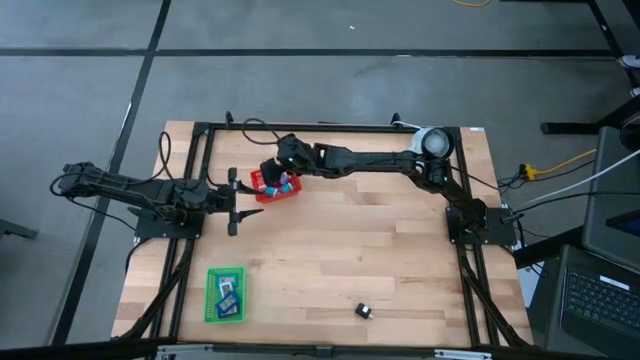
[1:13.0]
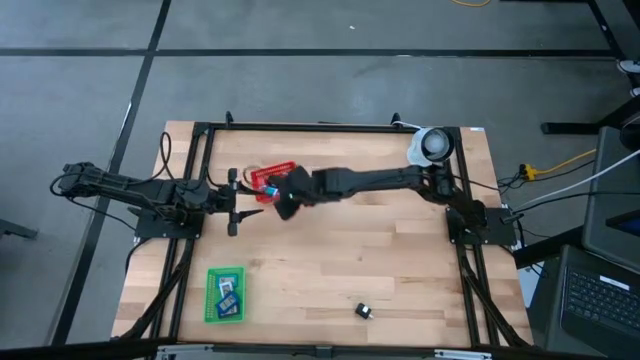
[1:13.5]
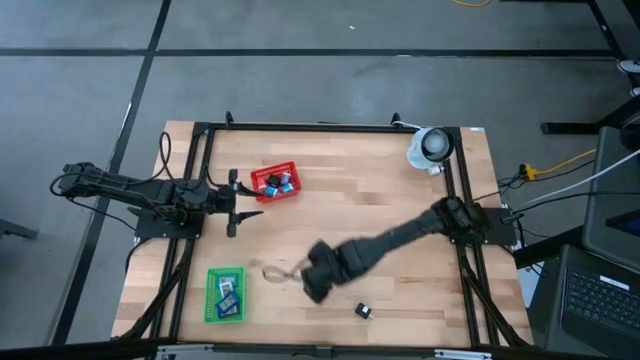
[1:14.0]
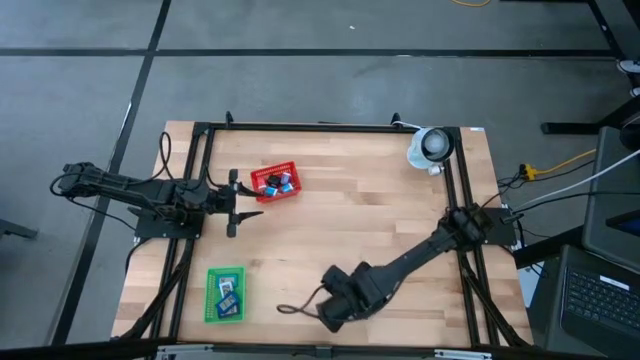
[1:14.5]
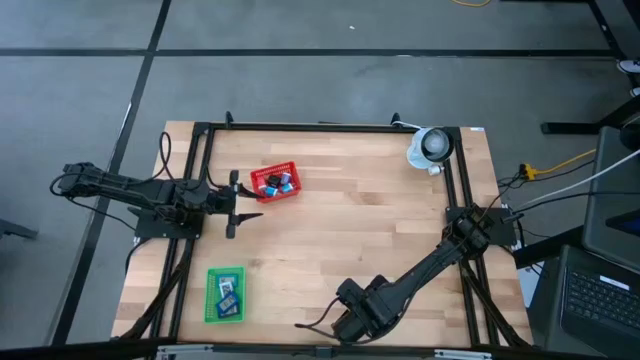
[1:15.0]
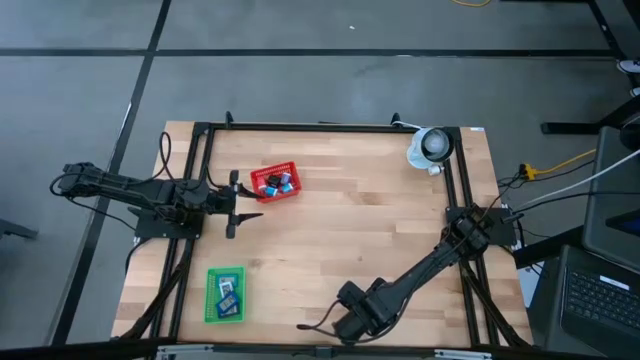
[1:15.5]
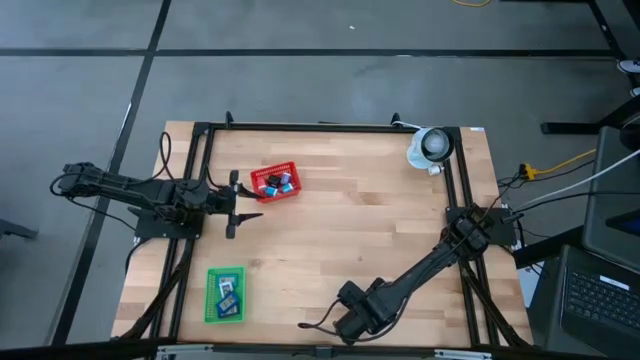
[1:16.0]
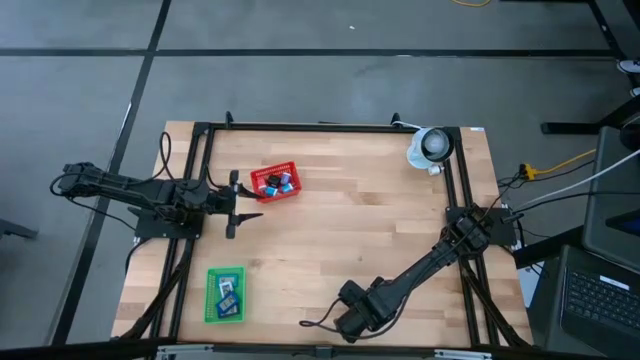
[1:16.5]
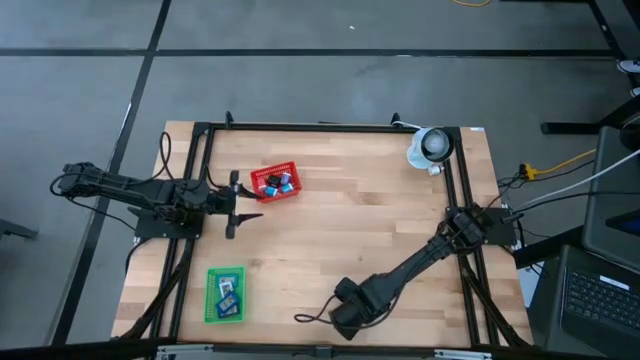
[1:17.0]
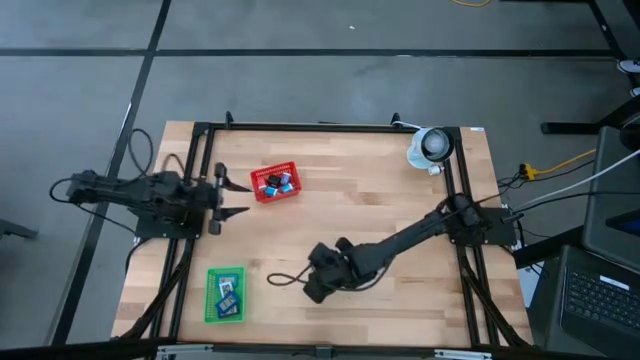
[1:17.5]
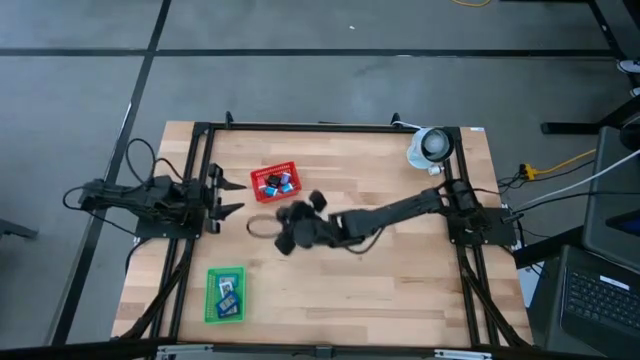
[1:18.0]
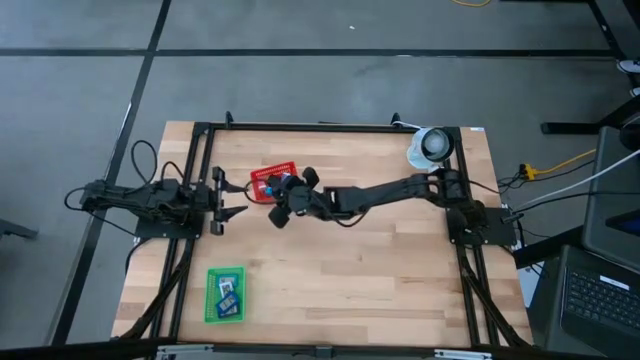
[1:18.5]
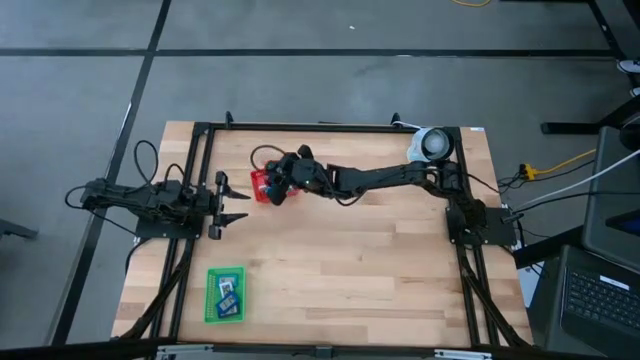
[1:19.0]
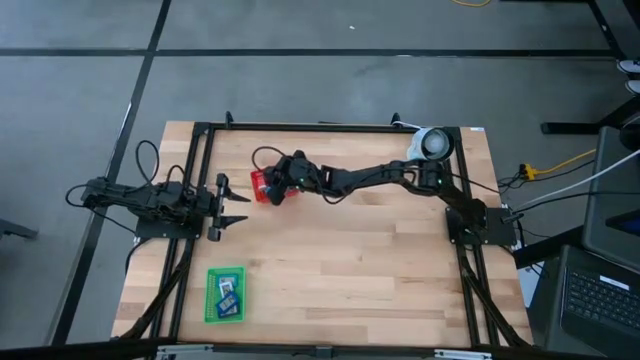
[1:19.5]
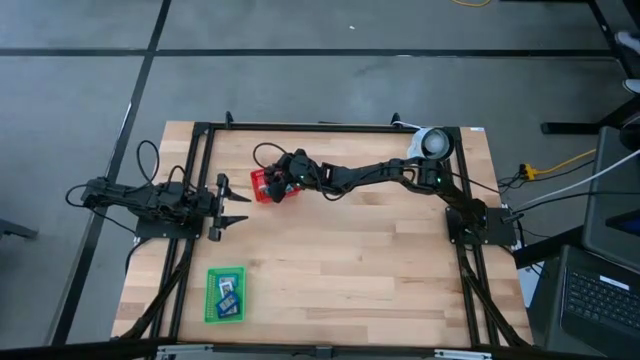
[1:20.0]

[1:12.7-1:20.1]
Task: Pick & Place Office items
Put the black charger adapter into the red bin

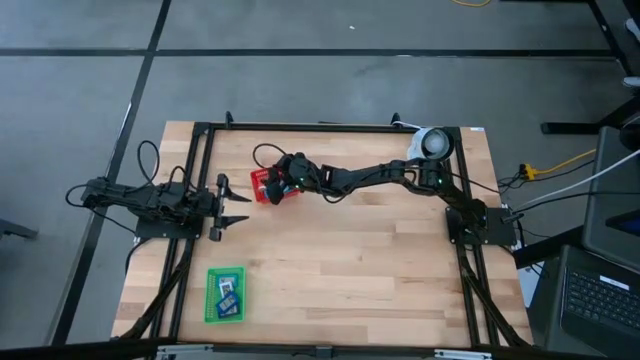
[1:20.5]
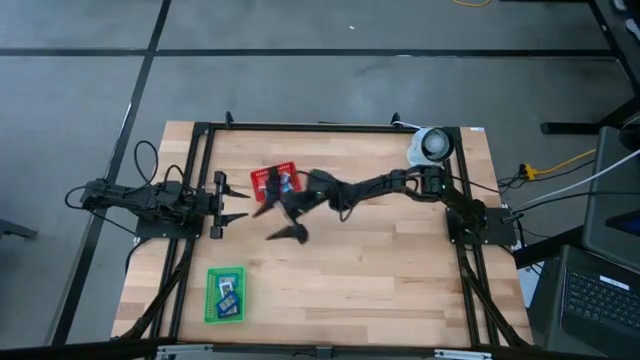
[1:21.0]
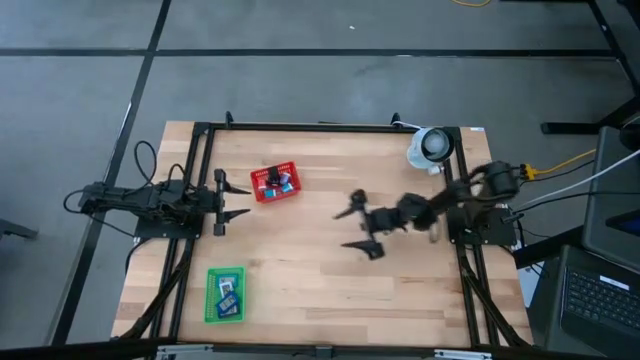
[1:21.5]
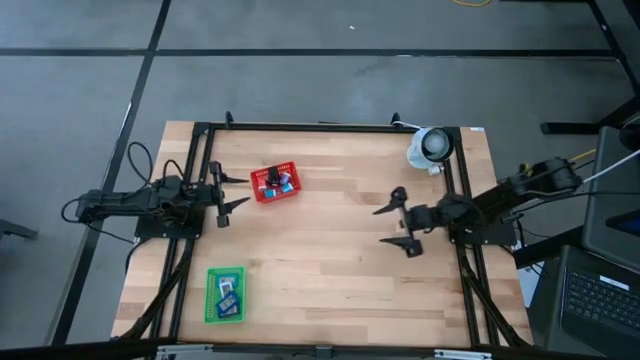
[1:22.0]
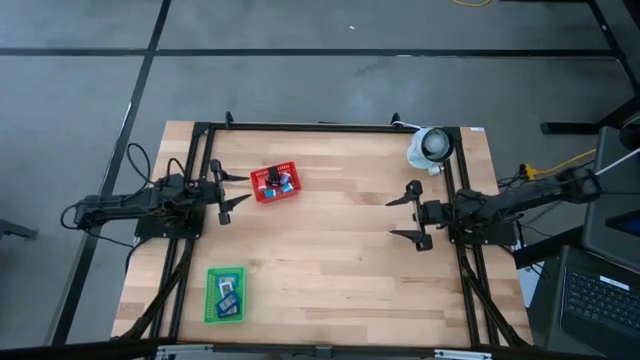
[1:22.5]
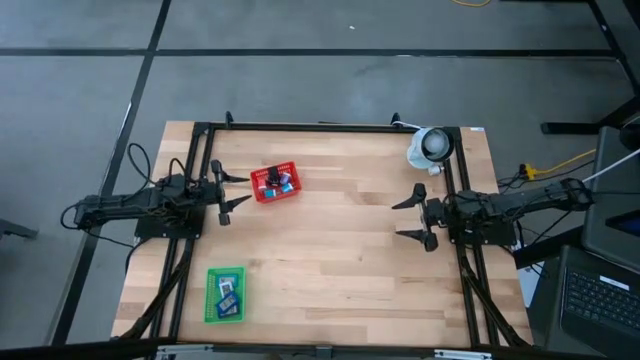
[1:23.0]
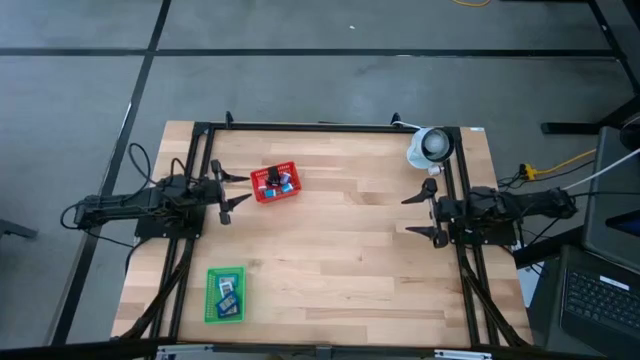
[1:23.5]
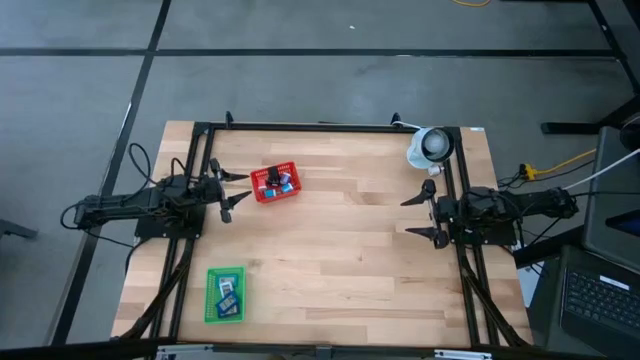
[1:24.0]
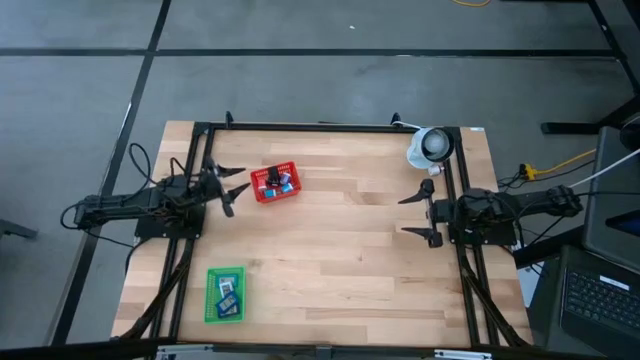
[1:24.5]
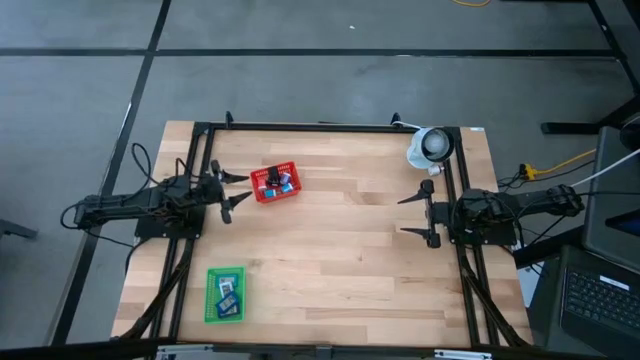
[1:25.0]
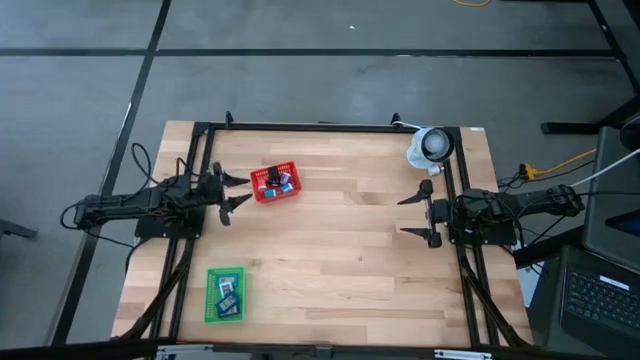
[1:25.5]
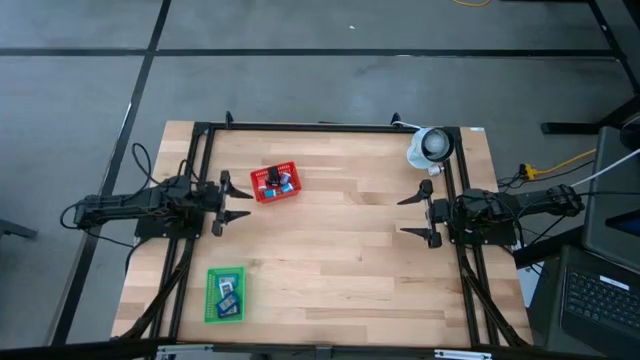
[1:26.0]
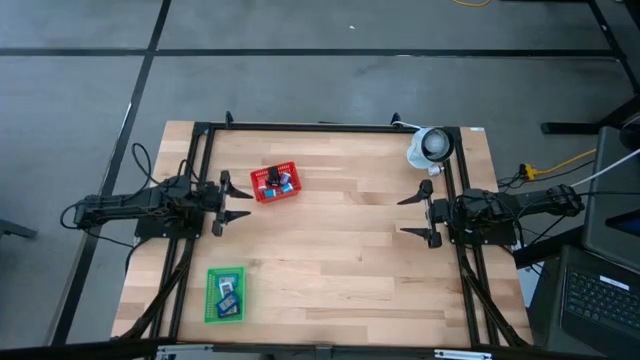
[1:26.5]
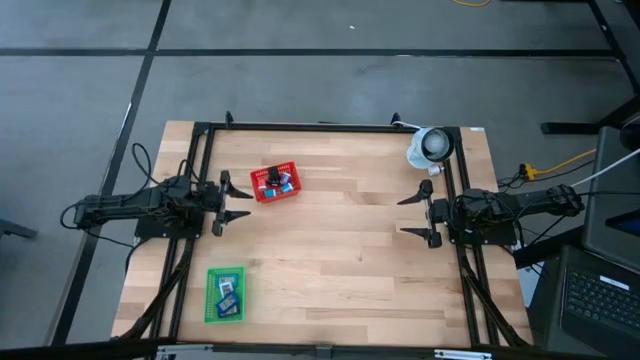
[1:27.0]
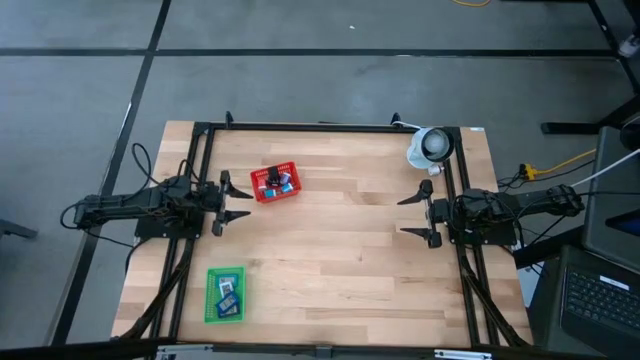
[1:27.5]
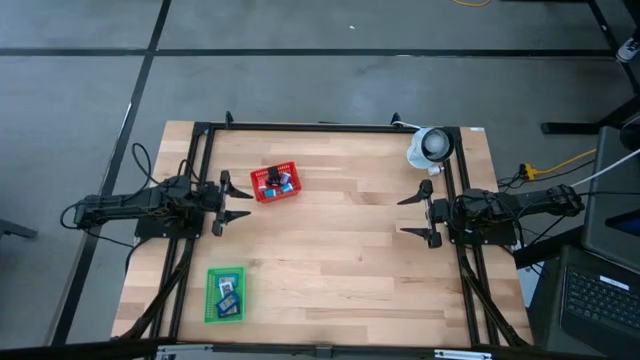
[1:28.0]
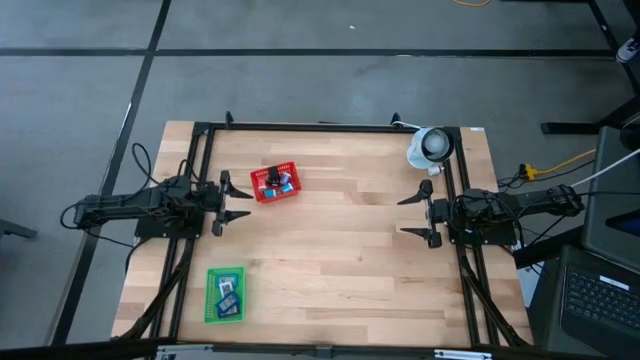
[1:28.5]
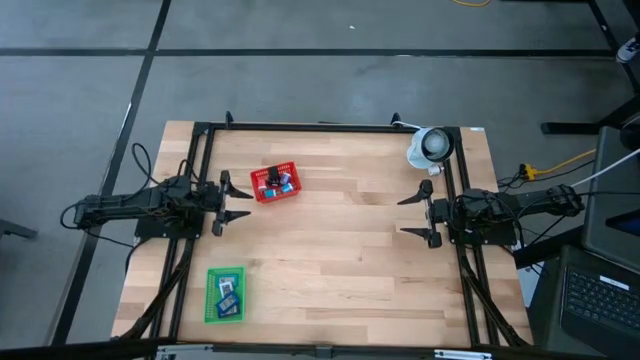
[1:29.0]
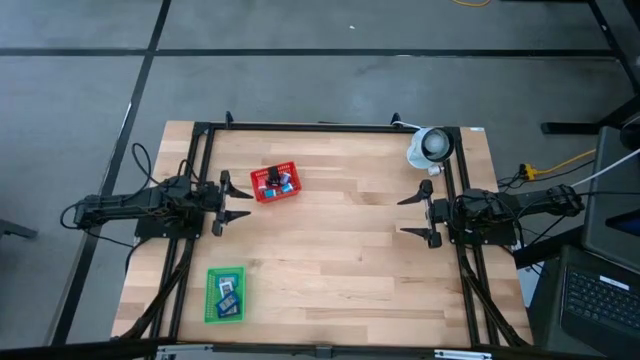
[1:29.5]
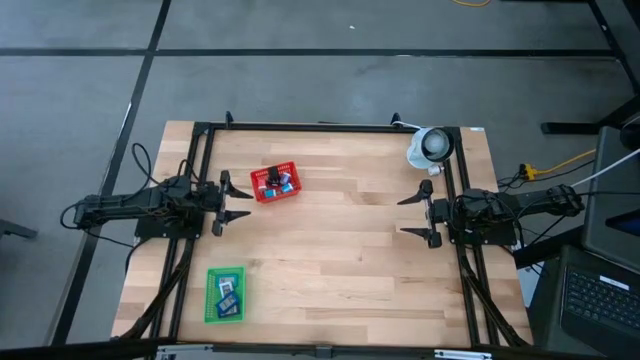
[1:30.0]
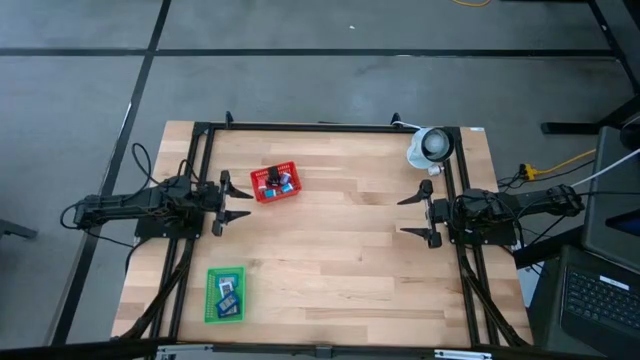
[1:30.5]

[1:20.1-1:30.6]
Return to Home Position

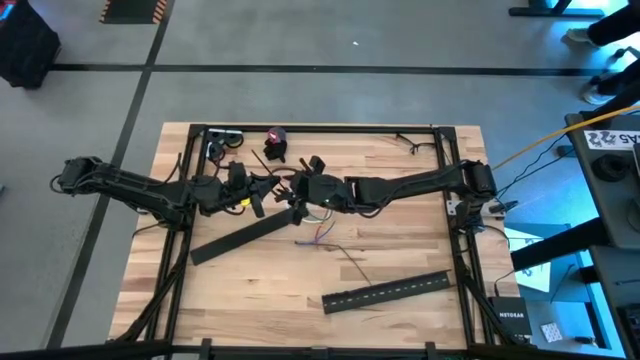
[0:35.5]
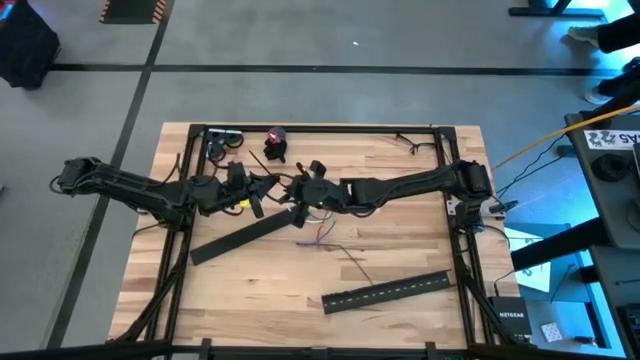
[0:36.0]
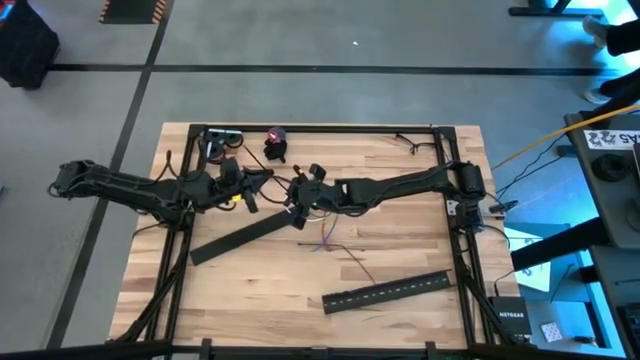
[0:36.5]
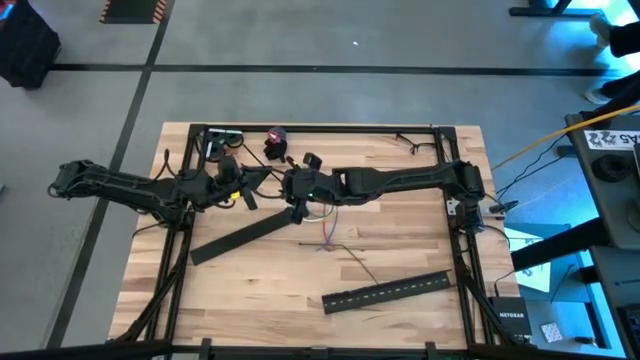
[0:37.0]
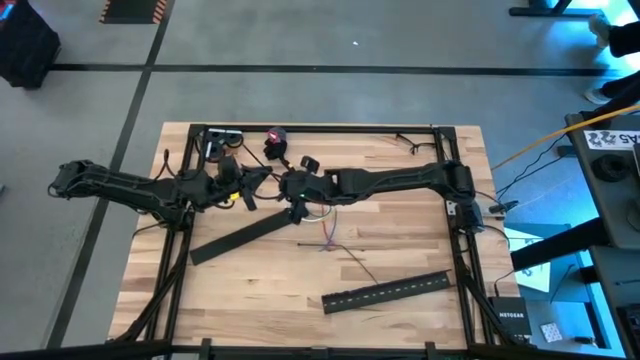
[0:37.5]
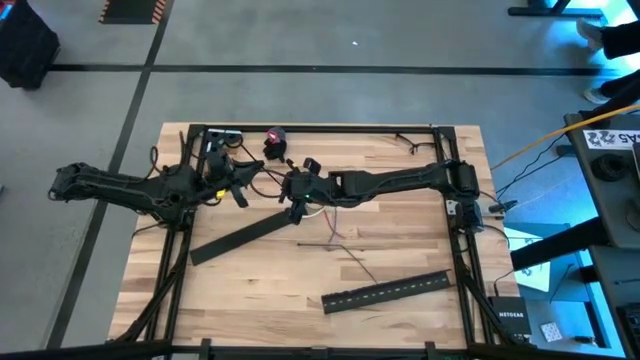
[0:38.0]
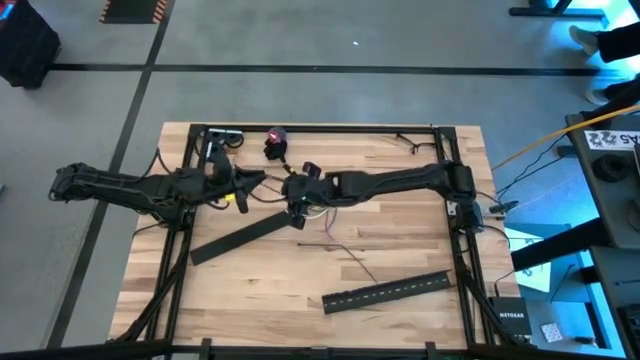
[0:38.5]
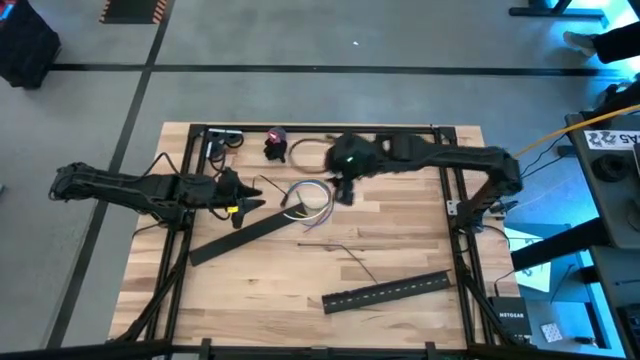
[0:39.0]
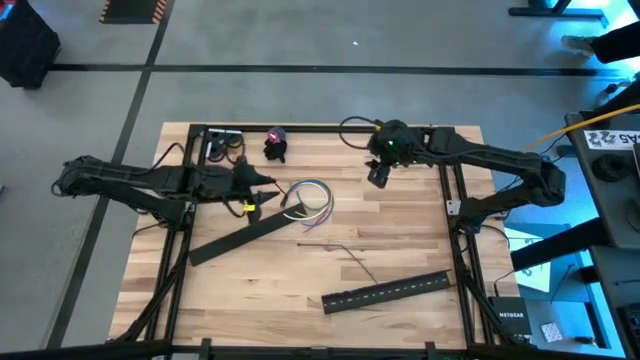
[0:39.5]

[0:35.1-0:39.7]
Task: Ziptie cables
Wrap the cable wires with the black zip tie
